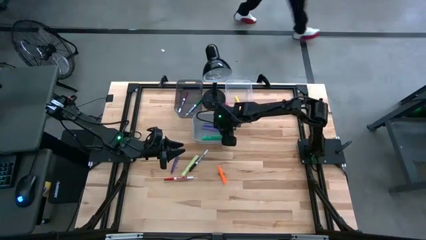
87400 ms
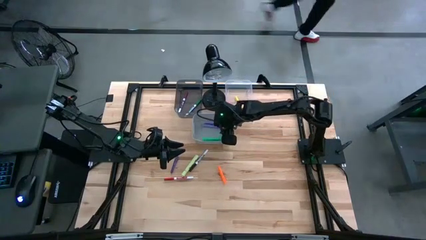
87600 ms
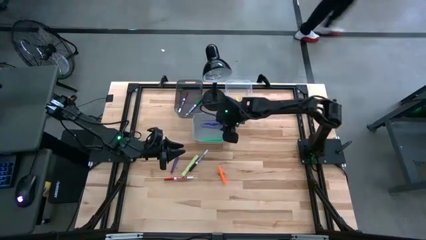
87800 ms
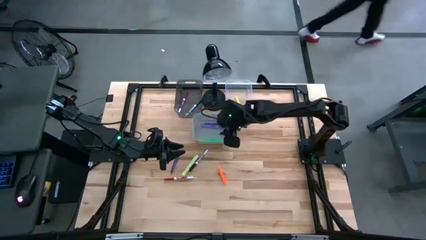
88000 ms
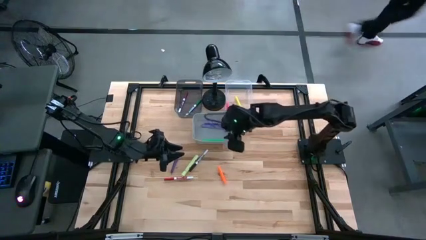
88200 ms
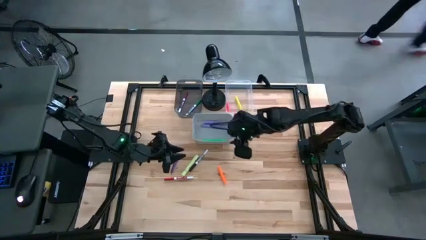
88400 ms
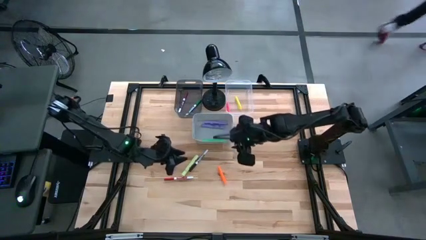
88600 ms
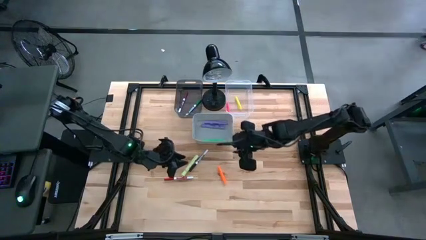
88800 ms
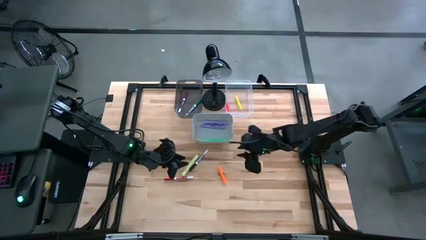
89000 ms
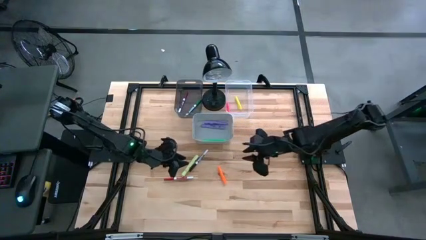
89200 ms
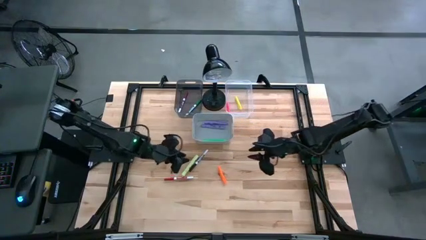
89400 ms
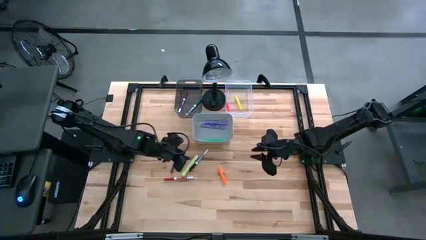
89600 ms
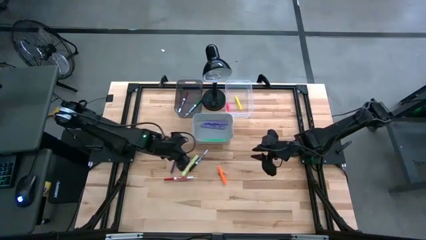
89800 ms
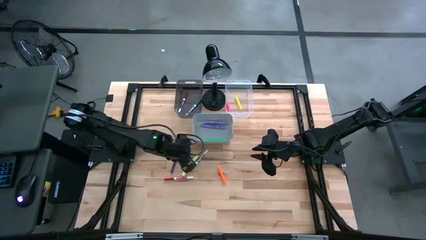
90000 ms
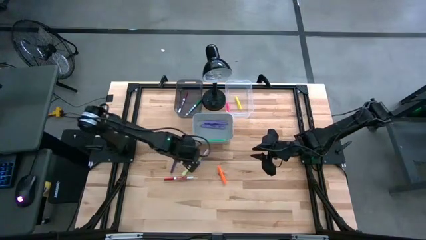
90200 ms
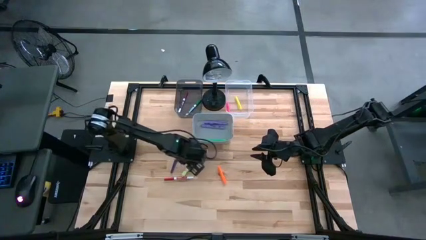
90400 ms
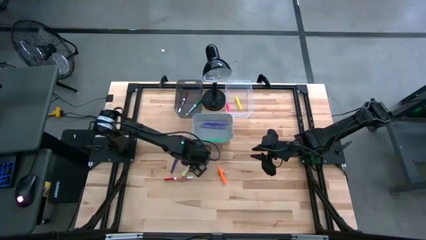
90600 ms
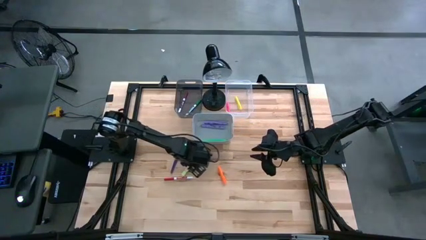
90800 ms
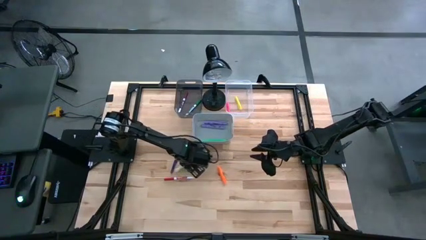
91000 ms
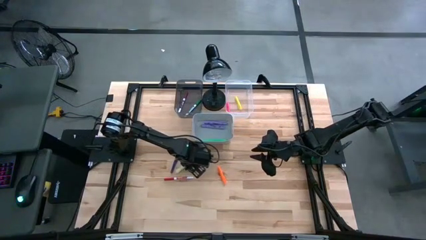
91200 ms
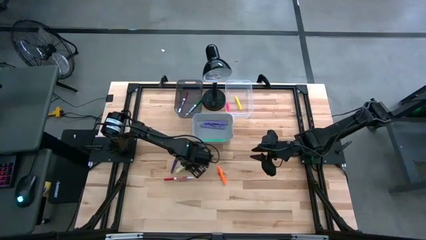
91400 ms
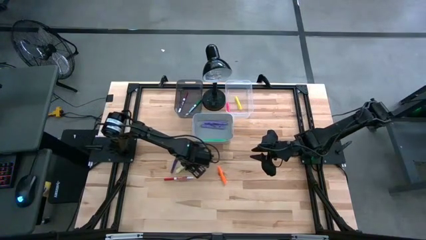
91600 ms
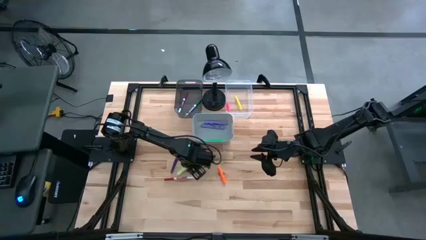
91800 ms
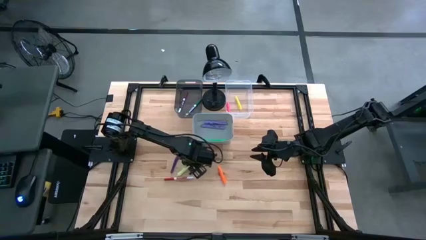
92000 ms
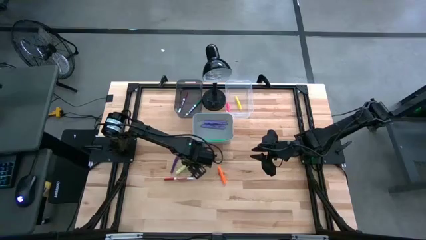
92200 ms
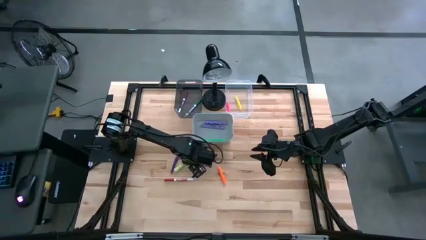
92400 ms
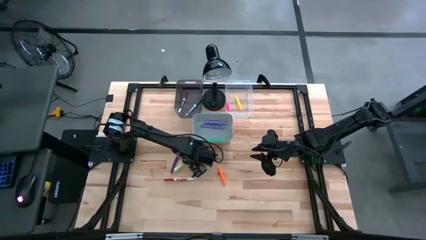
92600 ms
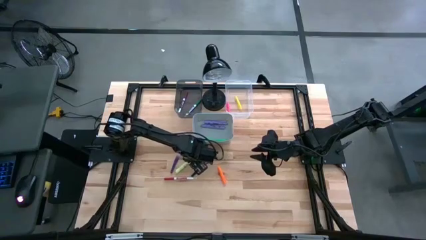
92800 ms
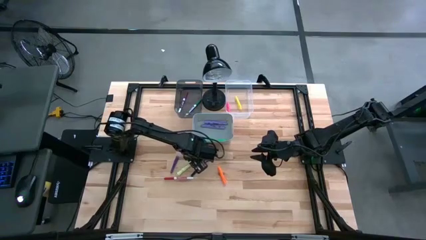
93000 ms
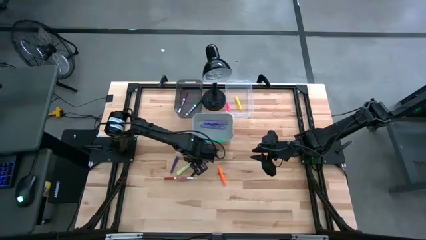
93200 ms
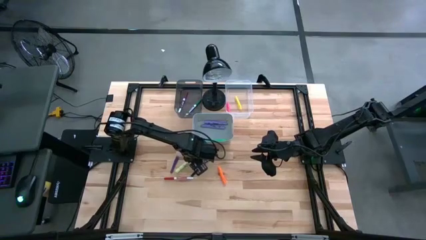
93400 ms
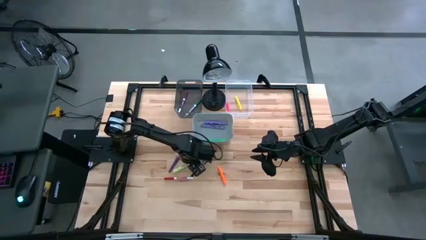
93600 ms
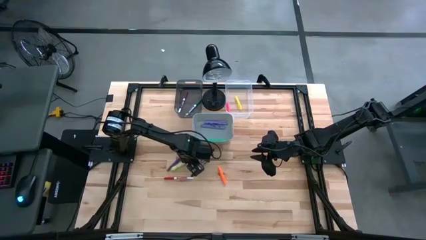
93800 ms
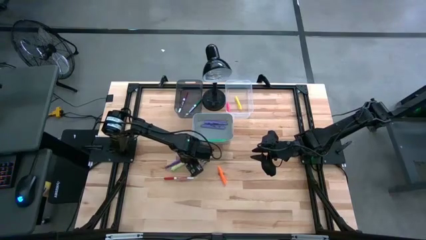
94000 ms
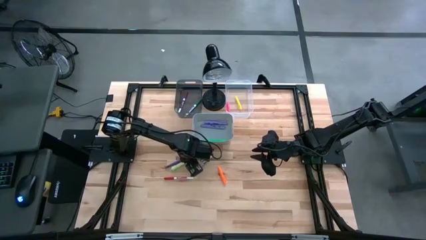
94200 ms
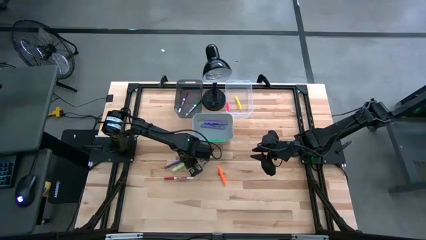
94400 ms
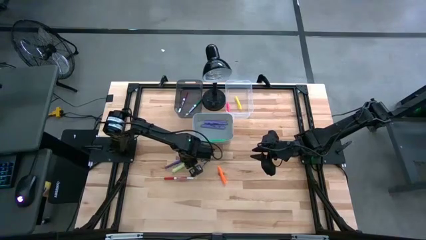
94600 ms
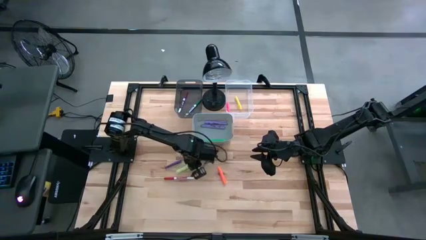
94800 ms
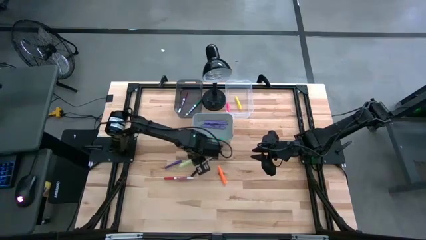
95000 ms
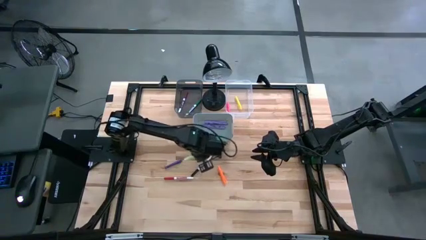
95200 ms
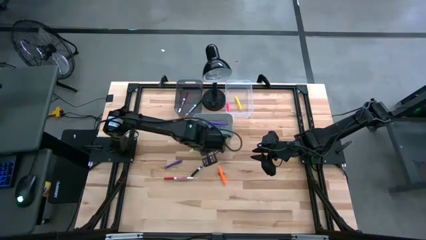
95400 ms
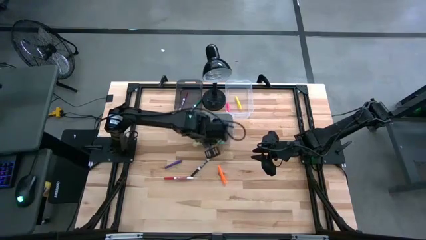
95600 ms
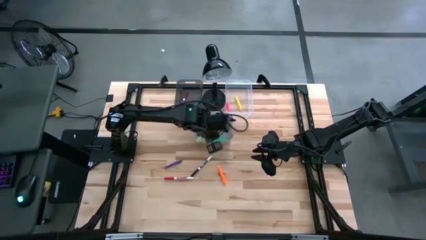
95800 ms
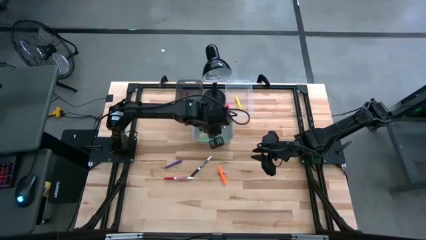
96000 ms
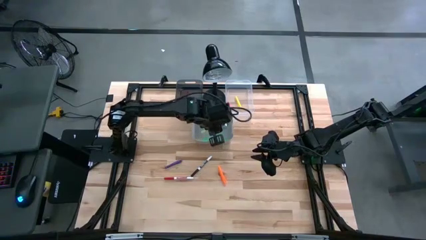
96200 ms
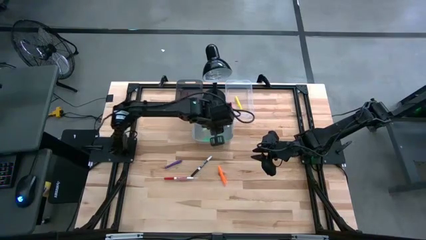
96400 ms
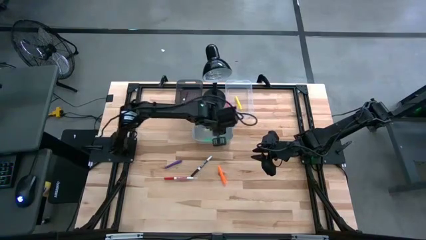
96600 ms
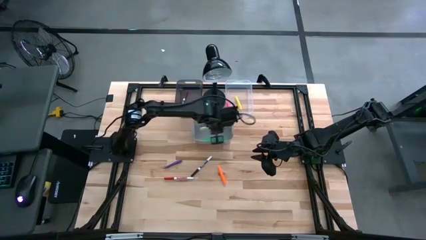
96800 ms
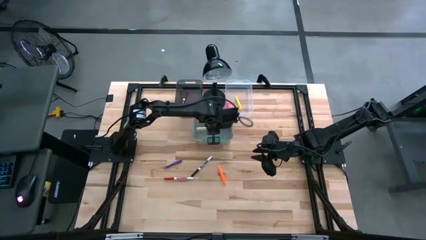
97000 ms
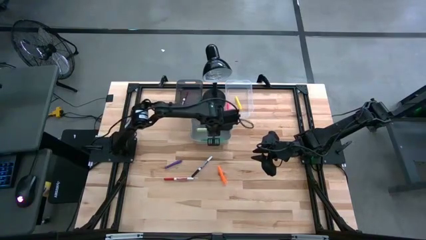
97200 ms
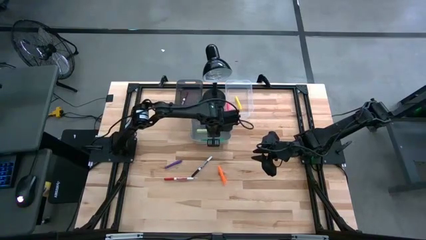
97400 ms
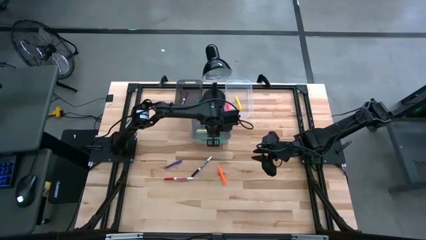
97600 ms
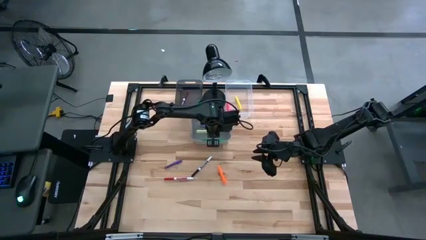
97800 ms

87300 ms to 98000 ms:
Task: Pick & Place Markers
Put the large light green marker into the gray bin
